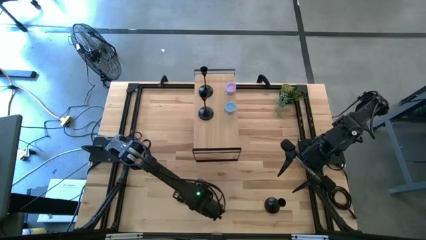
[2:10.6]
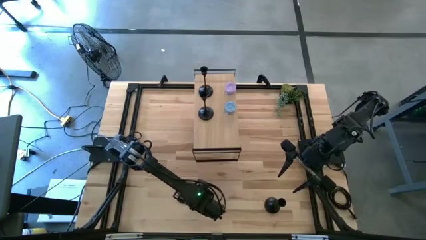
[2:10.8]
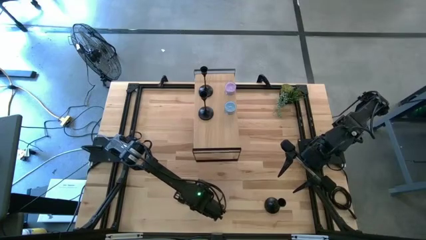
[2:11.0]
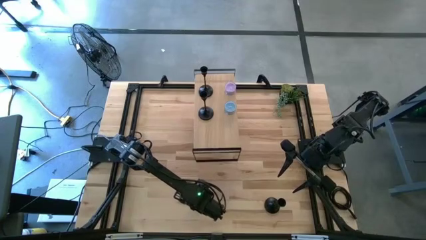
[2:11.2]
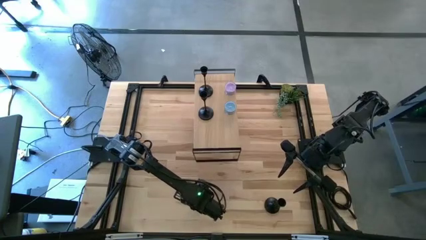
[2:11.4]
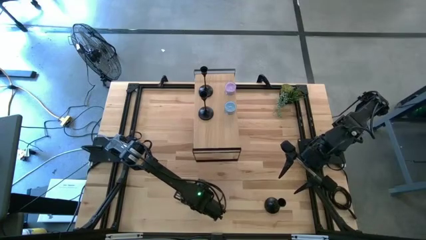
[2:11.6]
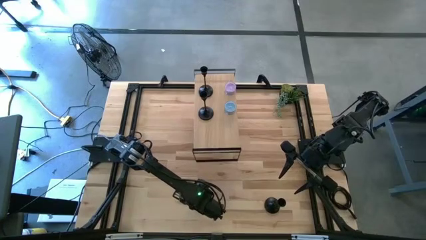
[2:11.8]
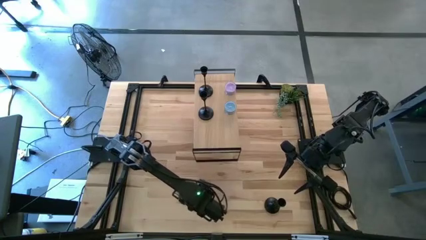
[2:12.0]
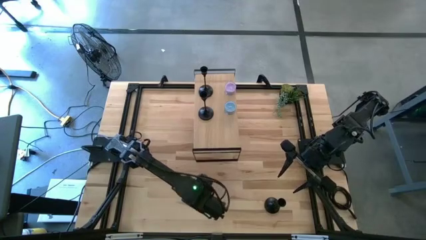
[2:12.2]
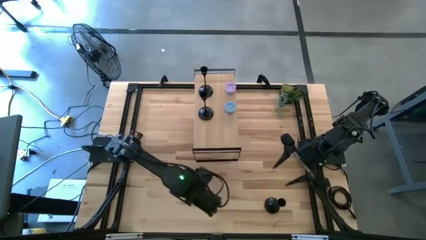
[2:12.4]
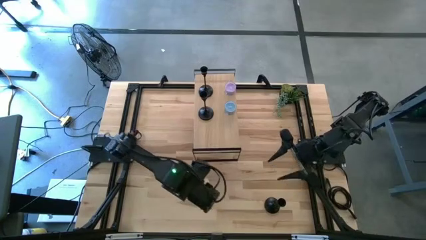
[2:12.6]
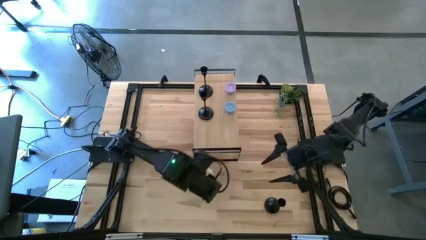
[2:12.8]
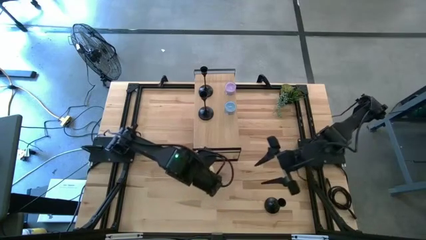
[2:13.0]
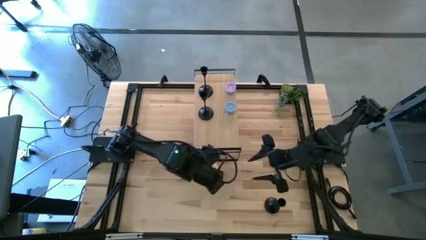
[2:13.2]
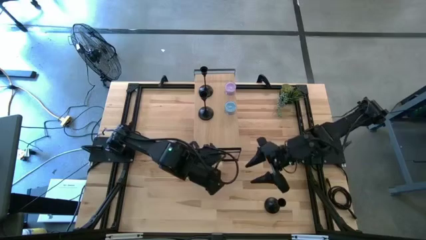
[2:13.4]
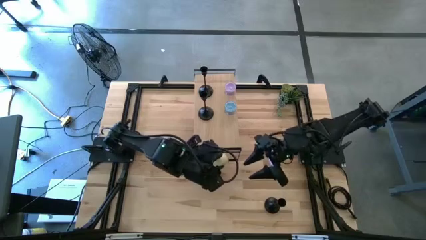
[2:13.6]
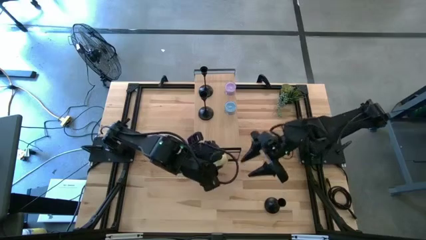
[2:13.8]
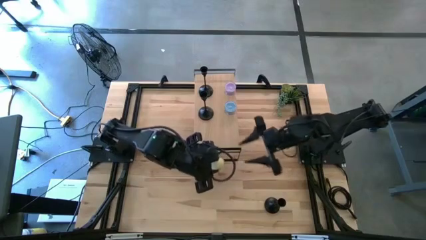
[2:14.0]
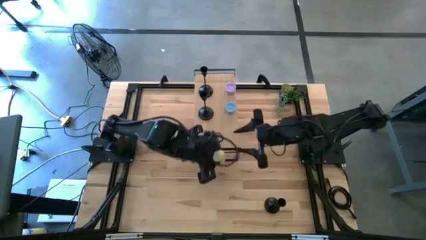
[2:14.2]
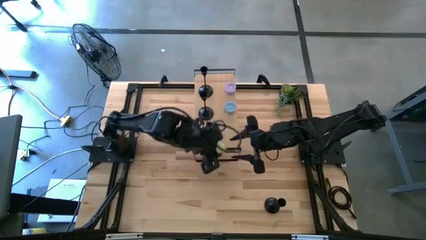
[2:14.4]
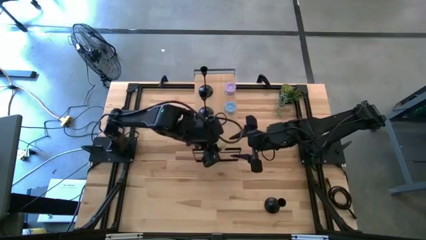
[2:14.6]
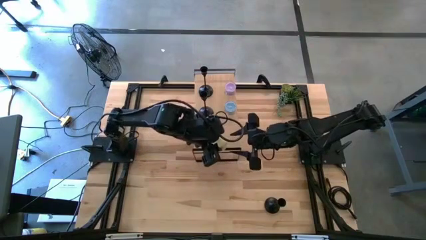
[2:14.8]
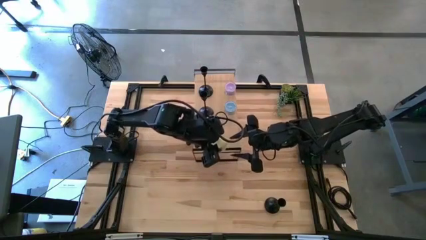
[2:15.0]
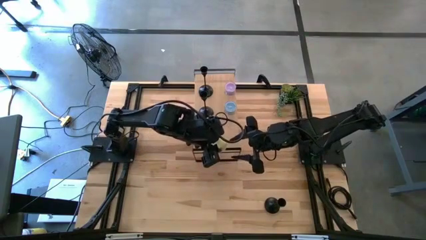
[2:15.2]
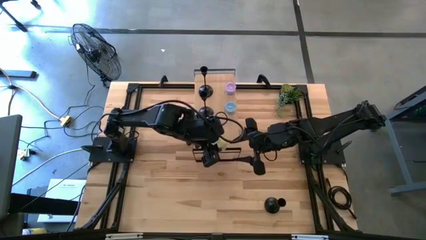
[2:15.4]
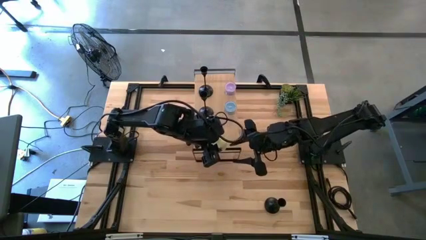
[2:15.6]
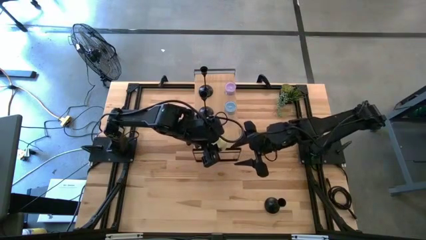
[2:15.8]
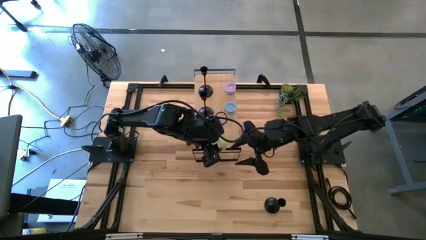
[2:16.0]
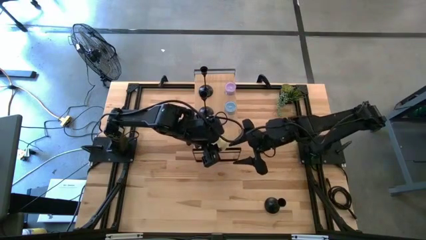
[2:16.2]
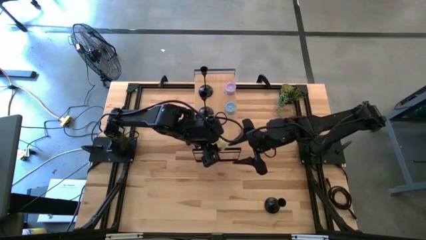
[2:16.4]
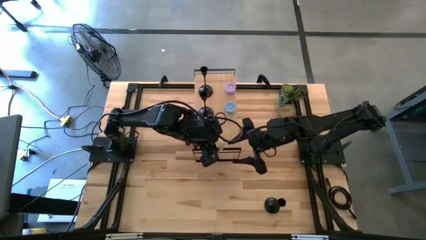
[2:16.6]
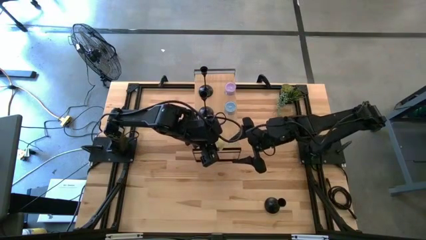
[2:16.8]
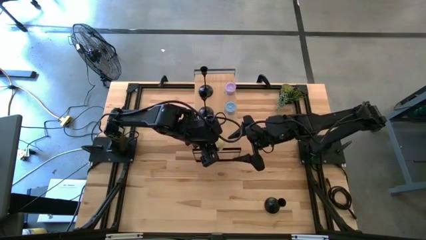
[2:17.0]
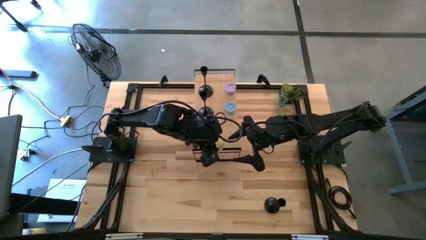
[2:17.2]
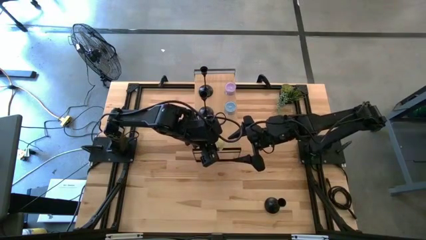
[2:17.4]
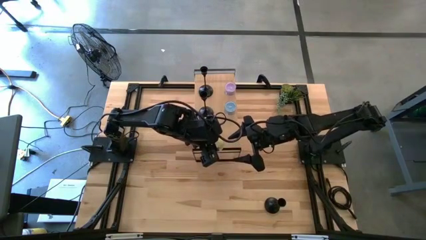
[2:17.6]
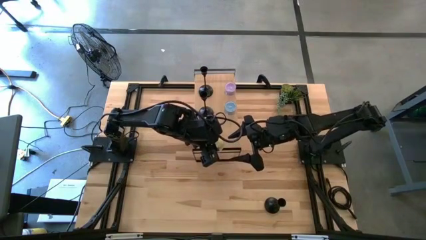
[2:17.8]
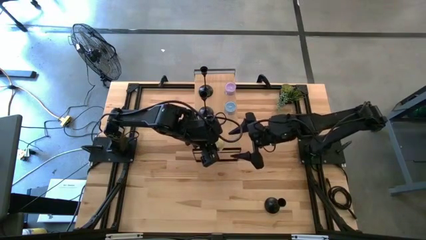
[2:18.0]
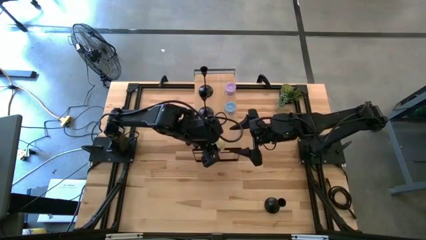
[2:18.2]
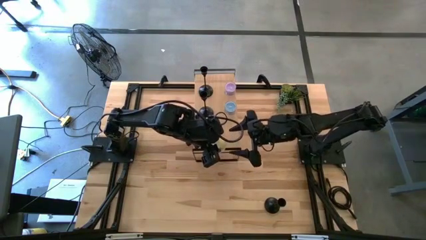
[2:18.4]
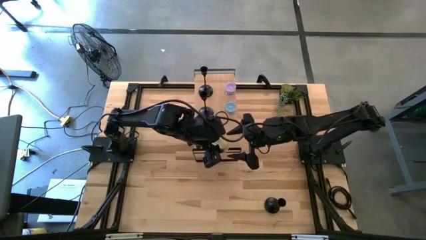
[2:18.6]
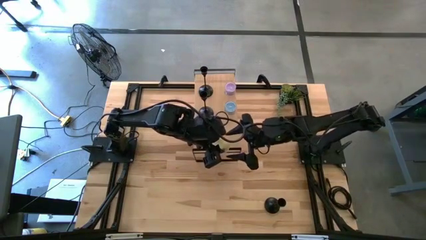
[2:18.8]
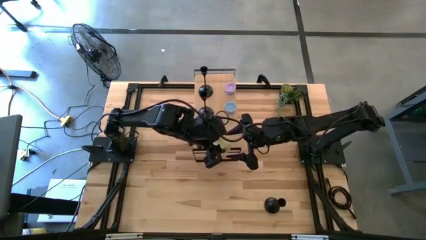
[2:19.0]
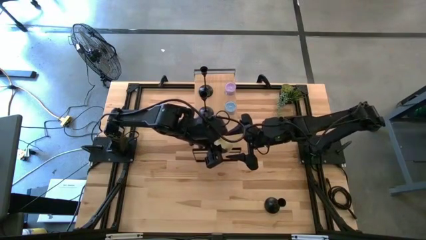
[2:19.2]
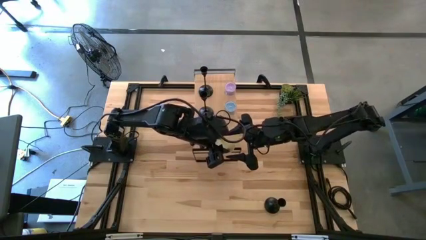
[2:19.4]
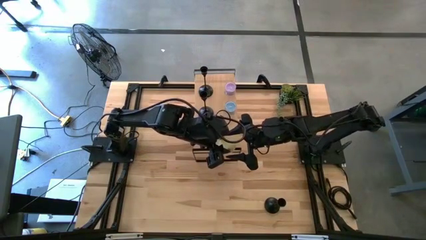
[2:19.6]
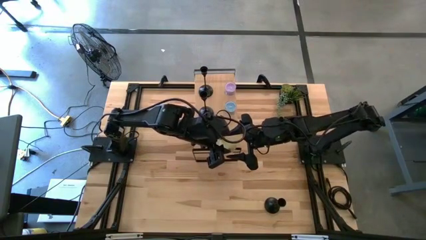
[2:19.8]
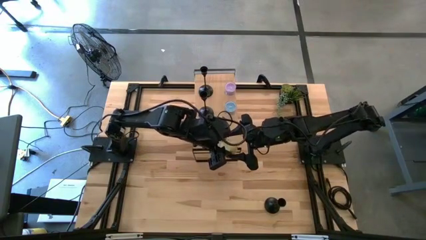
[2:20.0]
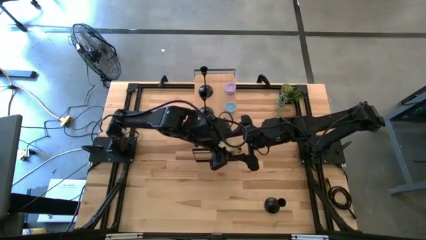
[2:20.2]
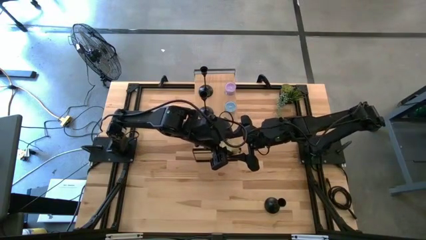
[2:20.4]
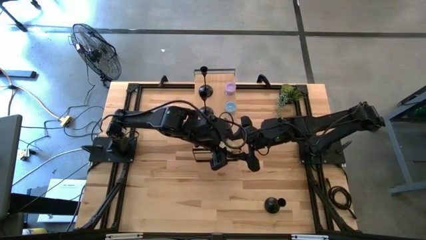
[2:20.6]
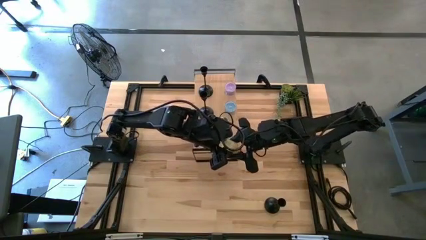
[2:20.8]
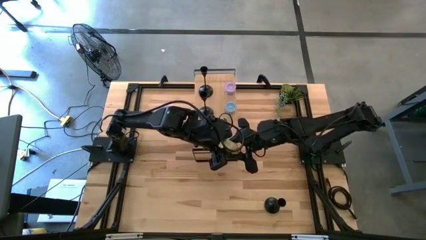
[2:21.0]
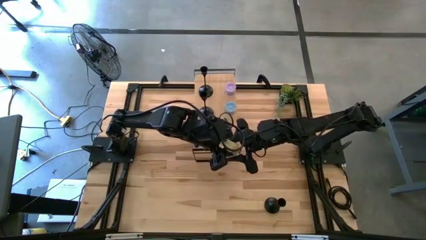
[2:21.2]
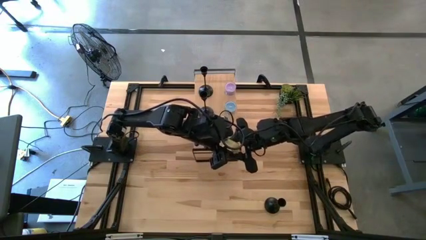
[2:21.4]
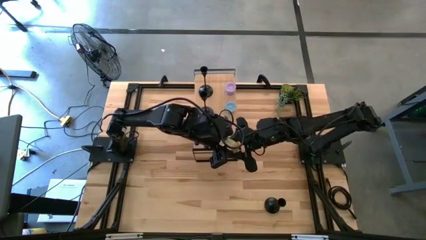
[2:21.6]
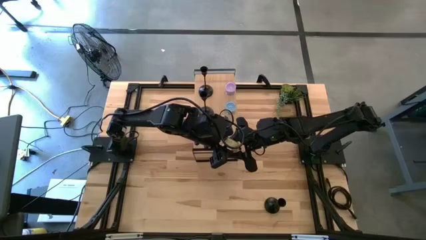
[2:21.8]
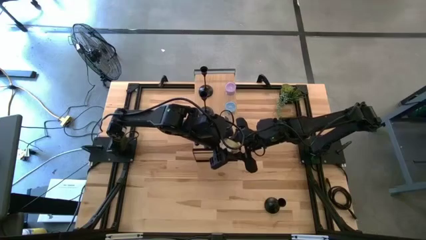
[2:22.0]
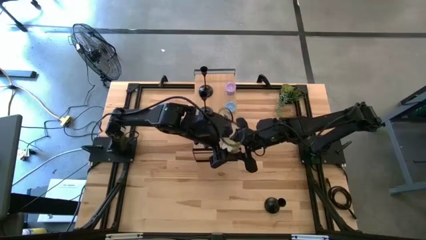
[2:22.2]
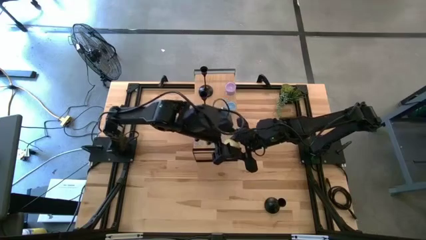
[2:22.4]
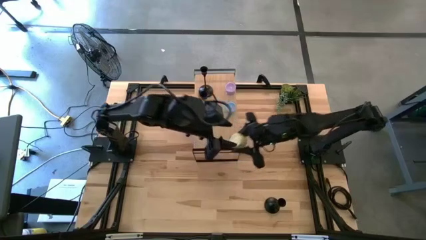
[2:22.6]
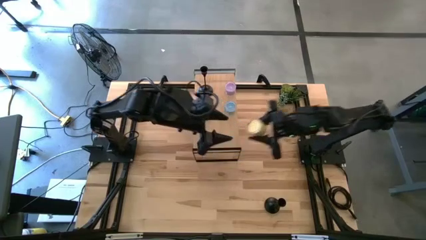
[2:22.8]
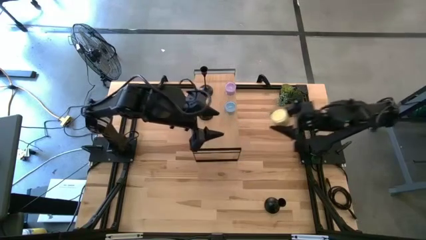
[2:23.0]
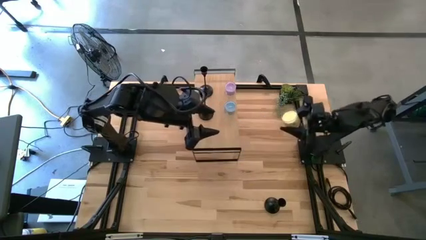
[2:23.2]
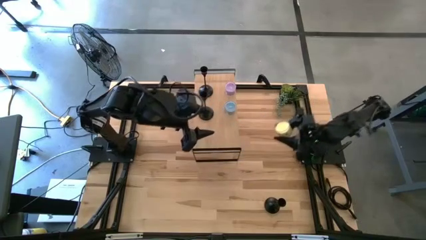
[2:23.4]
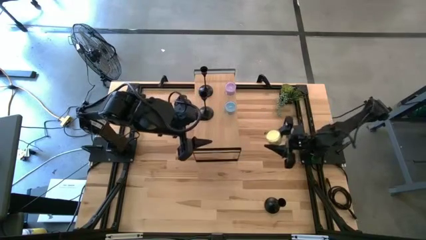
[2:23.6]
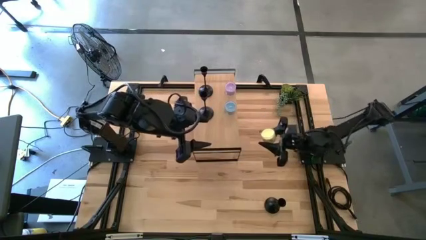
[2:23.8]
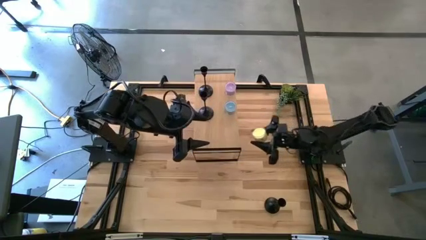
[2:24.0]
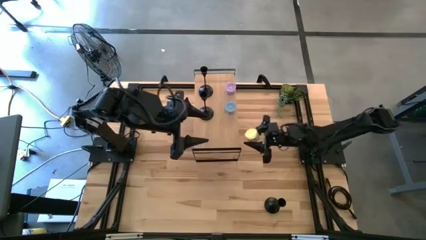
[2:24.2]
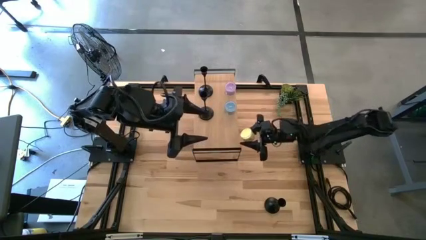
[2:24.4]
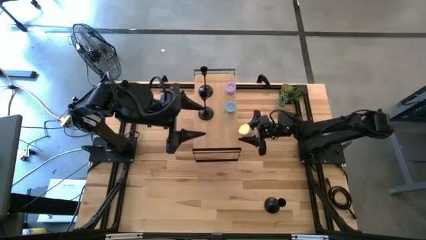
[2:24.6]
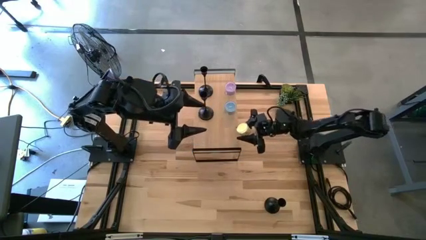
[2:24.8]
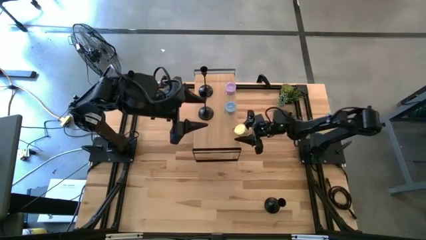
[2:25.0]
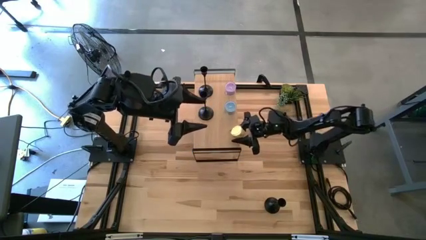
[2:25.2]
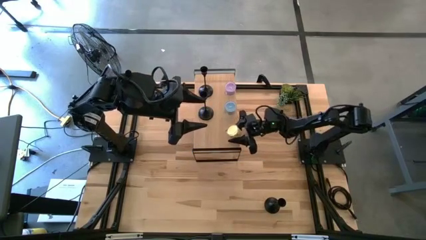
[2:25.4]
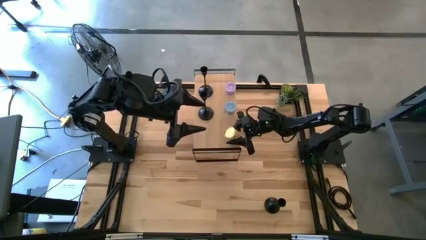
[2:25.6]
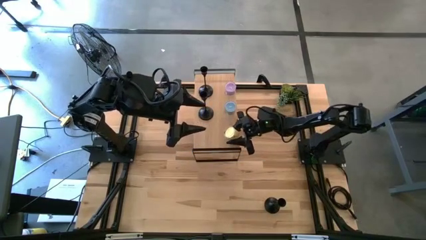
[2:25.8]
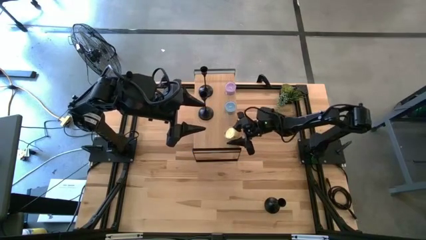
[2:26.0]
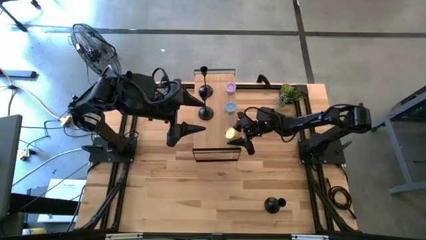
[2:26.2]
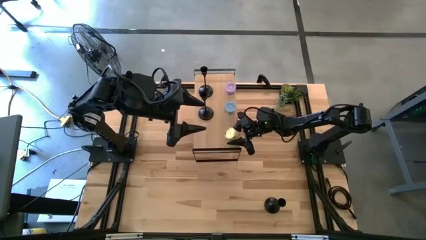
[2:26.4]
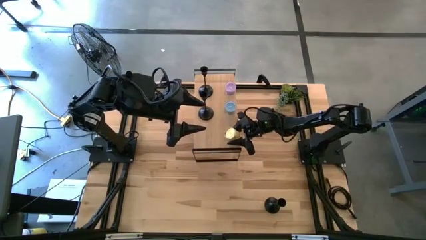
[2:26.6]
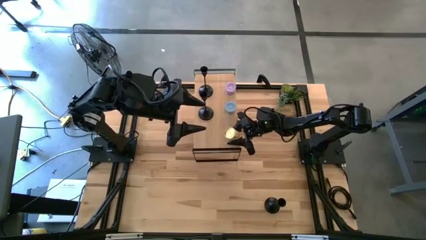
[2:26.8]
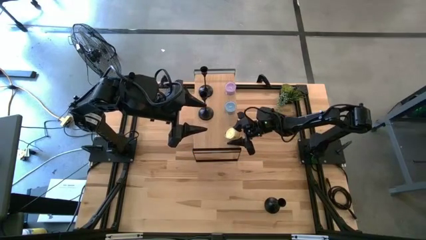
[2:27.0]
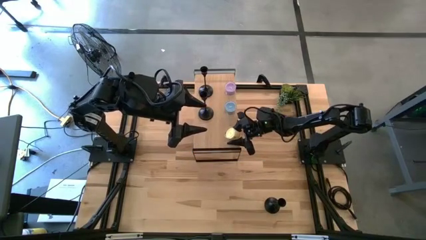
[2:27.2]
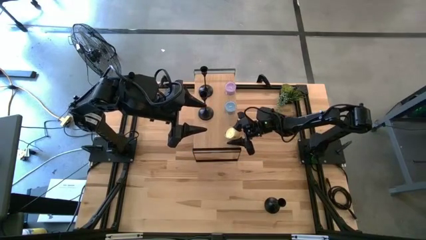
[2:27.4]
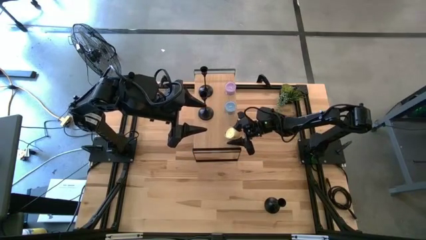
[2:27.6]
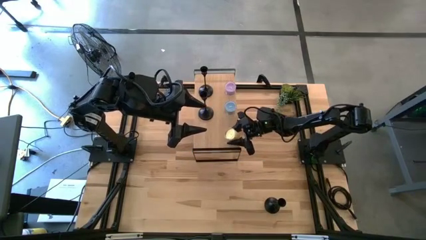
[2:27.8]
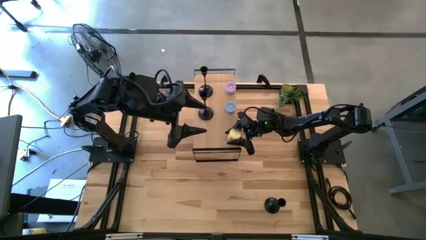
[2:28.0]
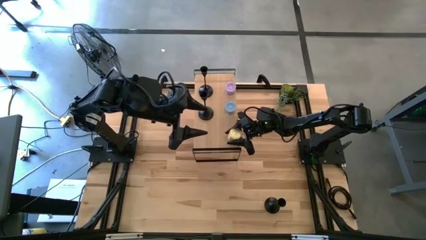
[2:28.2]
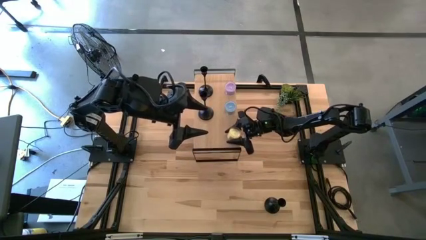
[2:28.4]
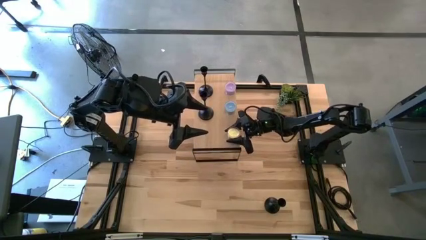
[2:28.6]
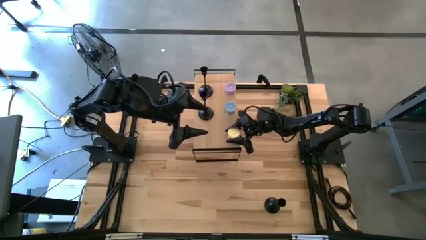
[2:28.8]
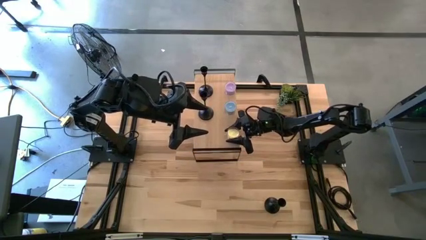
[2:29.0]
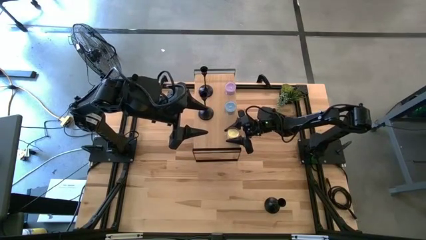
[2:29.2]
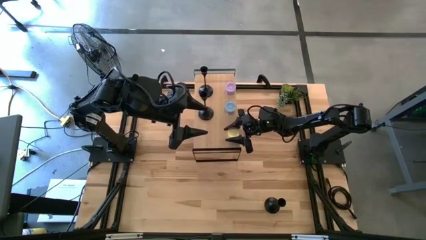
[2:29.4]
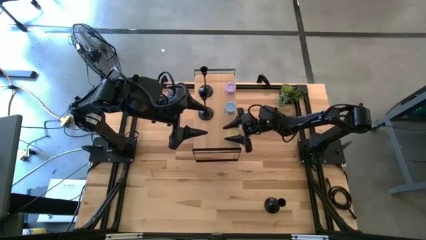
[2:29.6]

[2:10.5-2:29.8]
Task: Pick & Place candle stick holders
Put the yellow scented candle on the shelf
